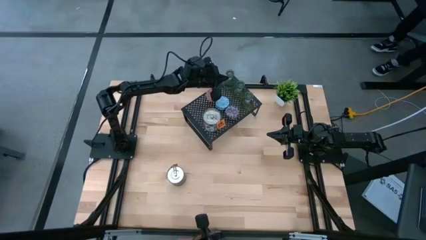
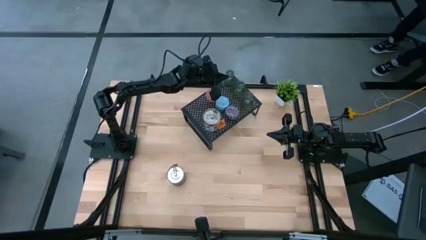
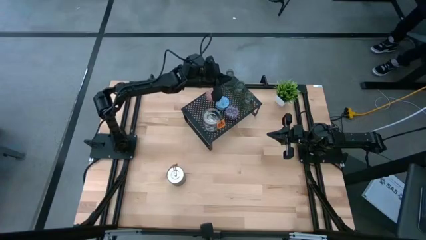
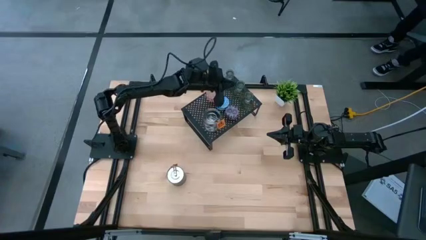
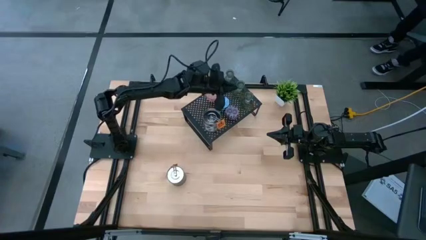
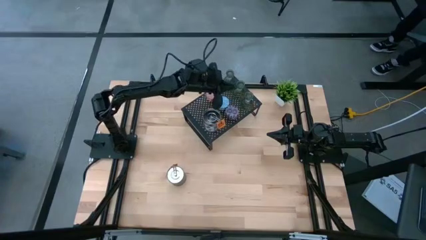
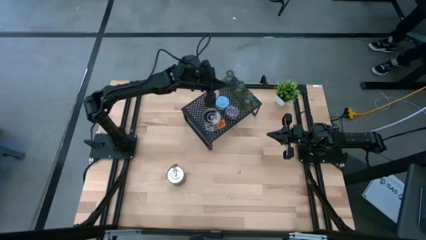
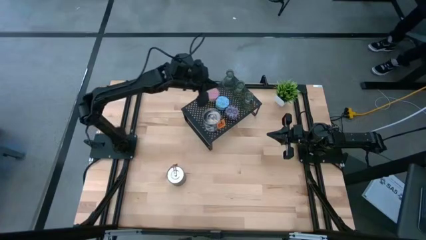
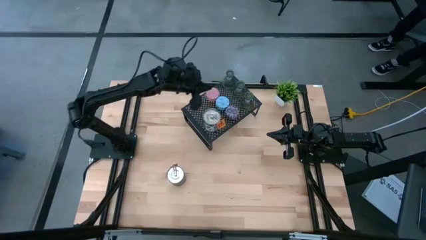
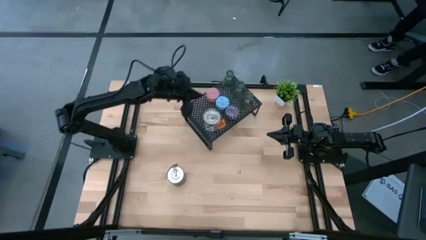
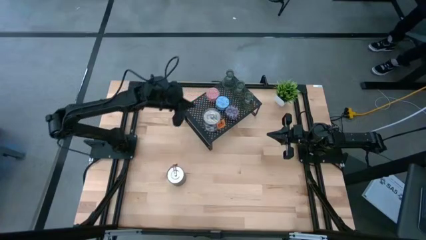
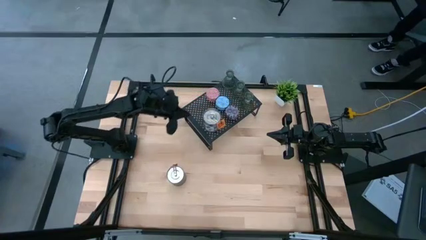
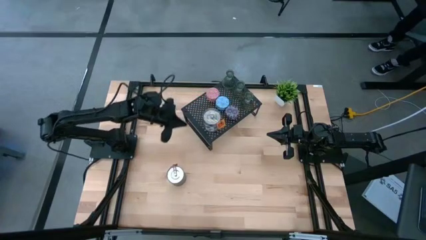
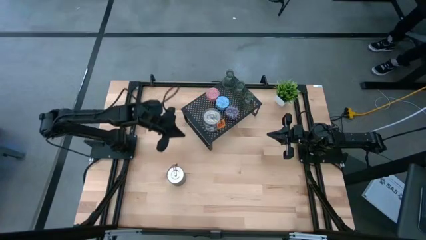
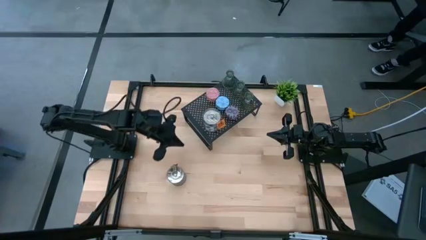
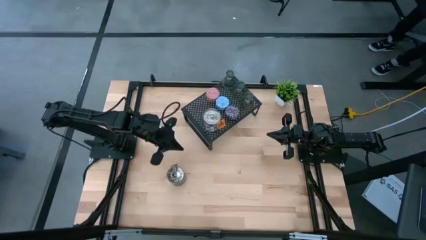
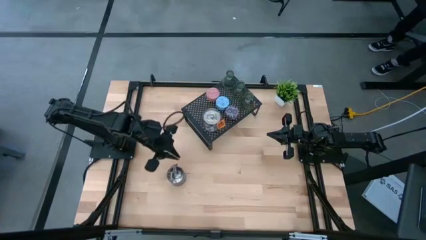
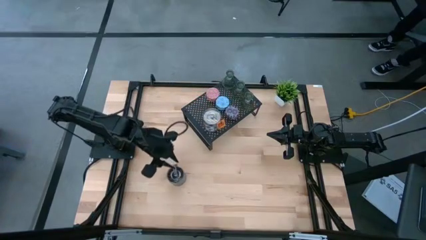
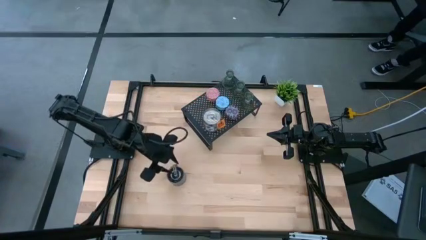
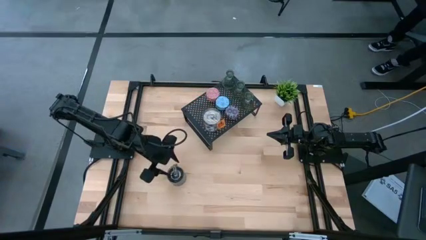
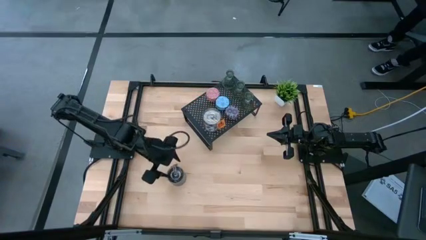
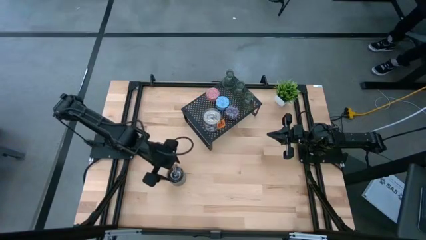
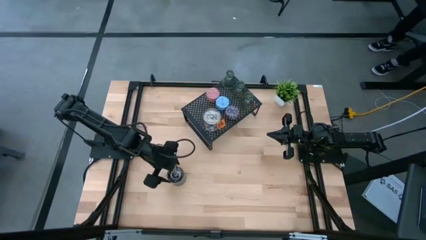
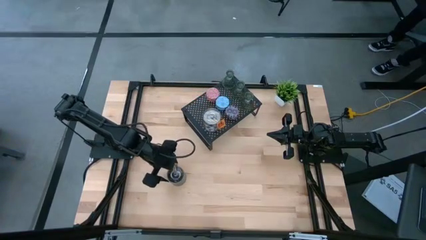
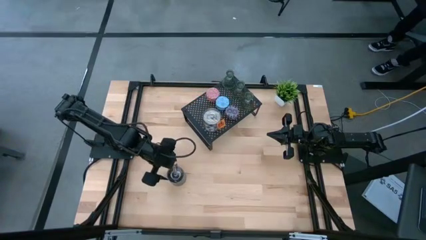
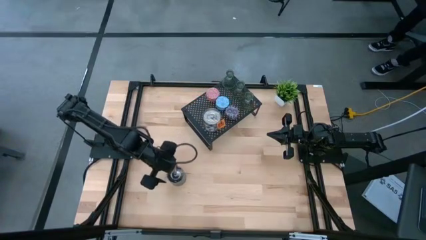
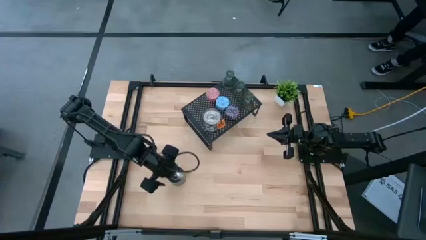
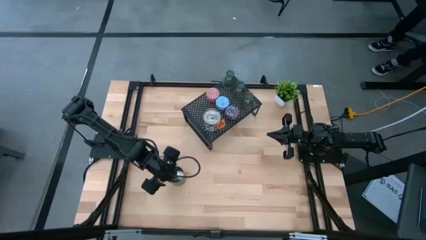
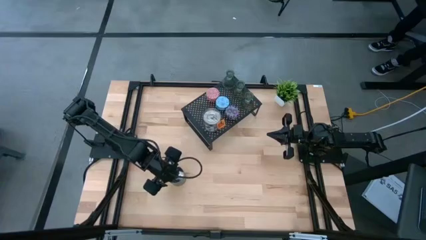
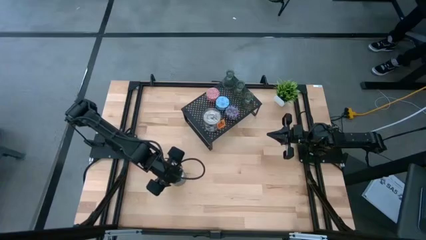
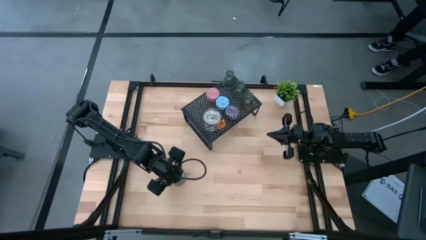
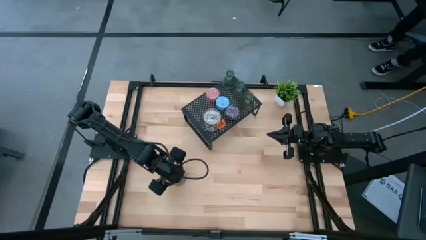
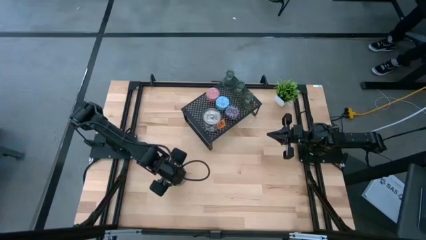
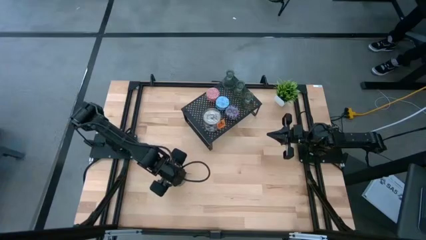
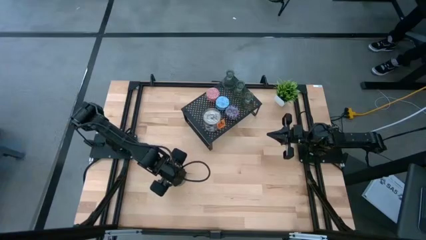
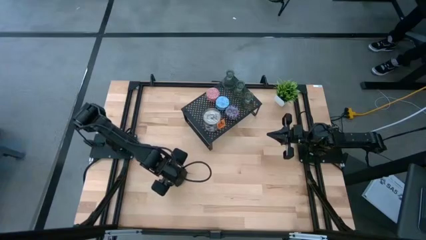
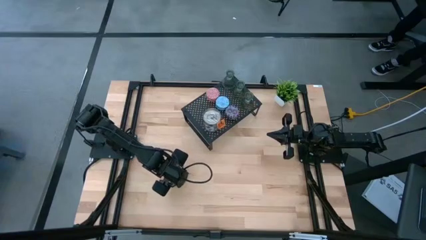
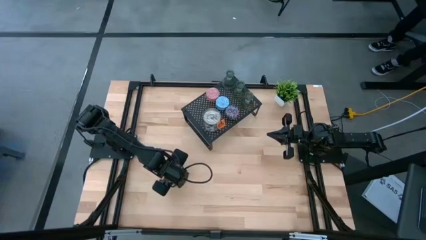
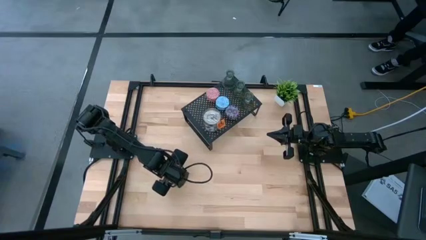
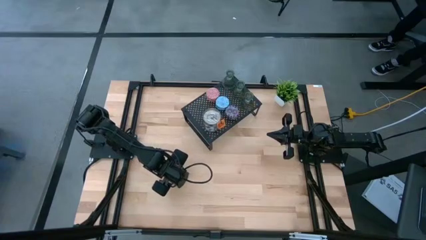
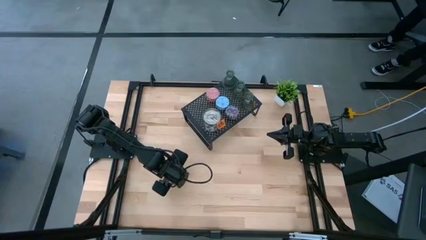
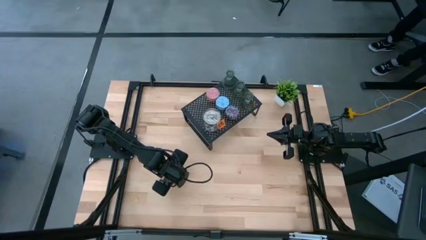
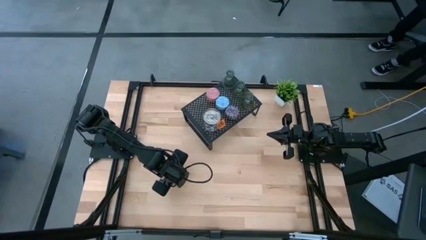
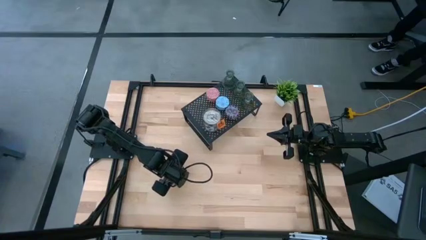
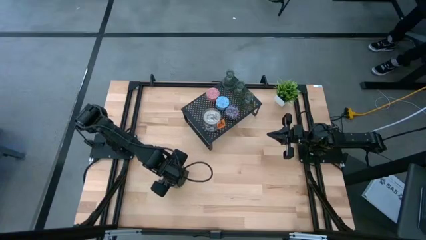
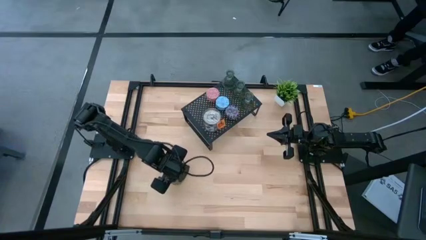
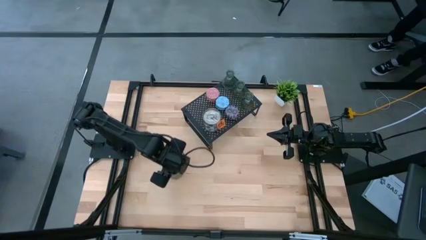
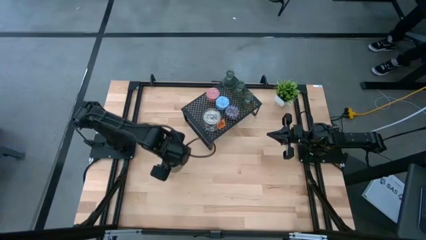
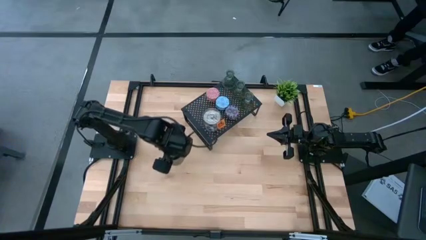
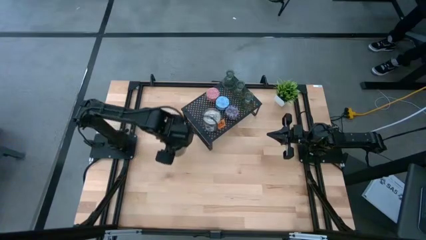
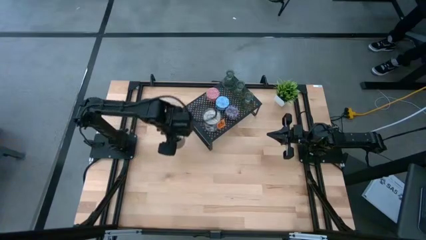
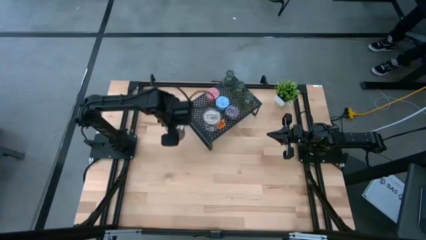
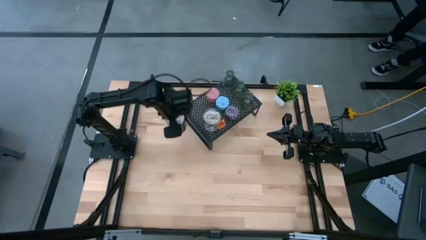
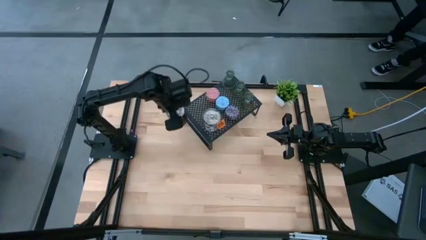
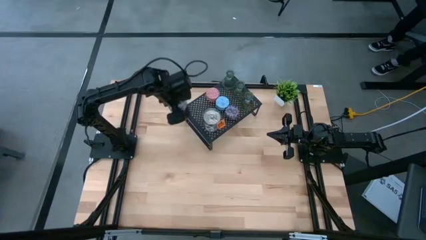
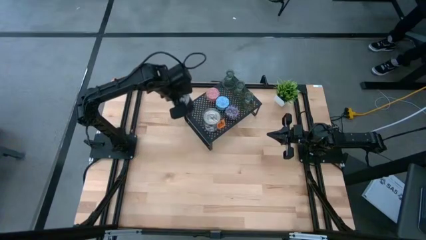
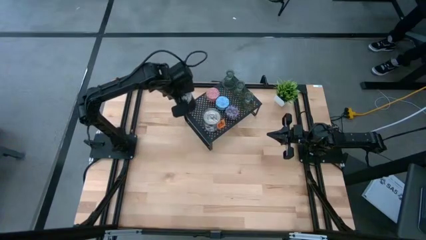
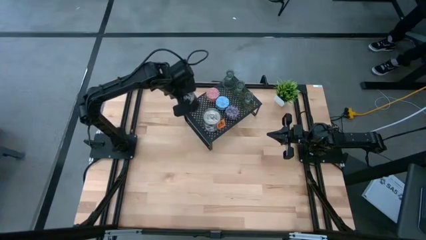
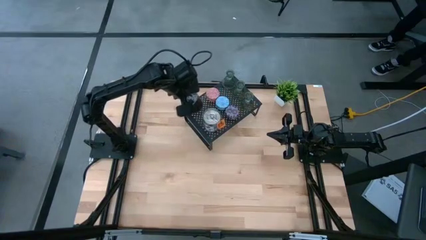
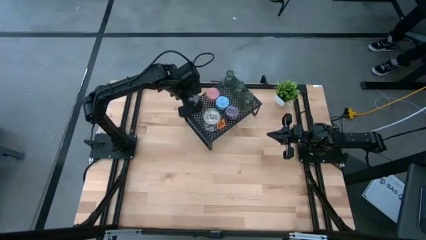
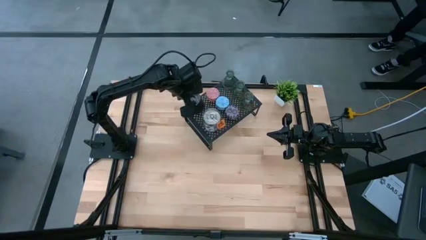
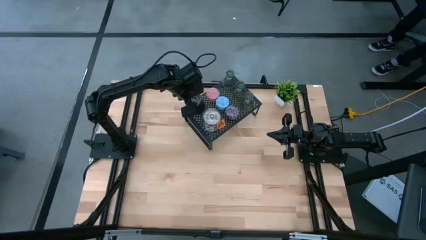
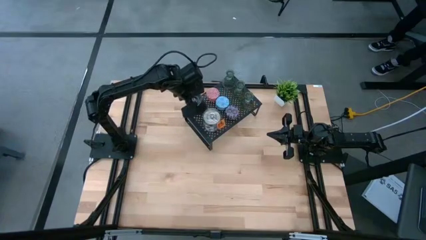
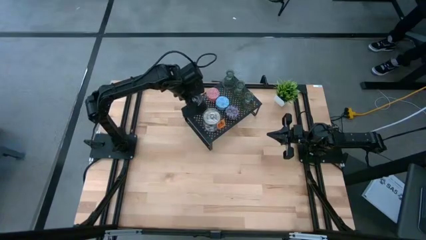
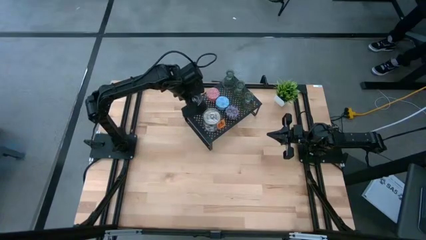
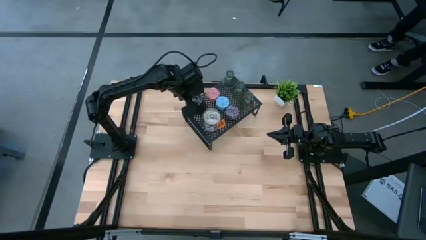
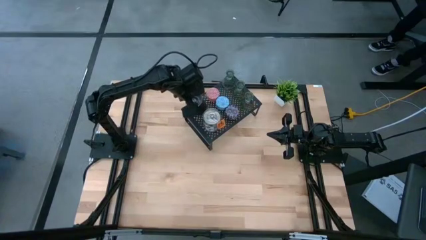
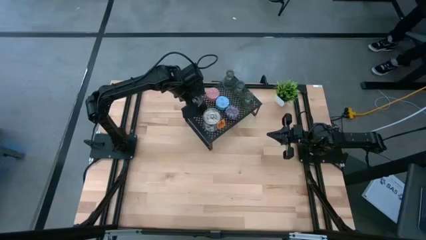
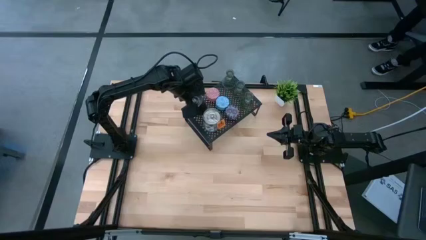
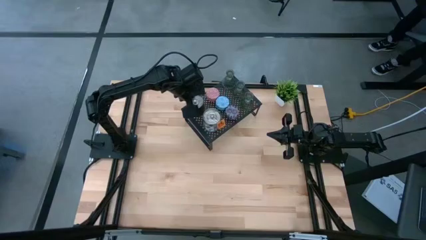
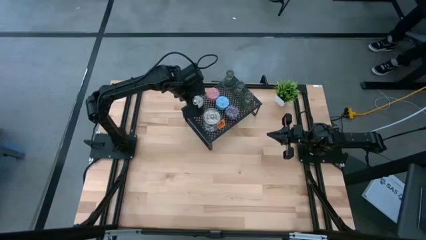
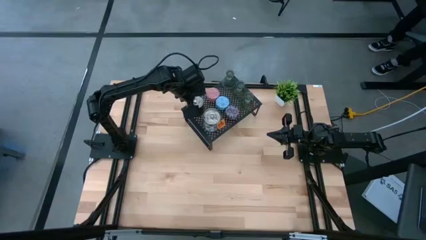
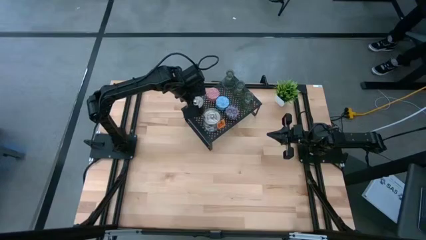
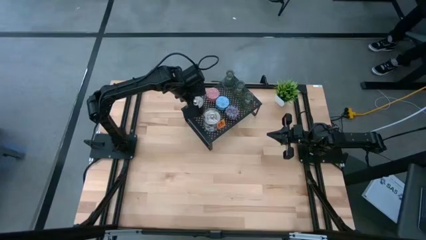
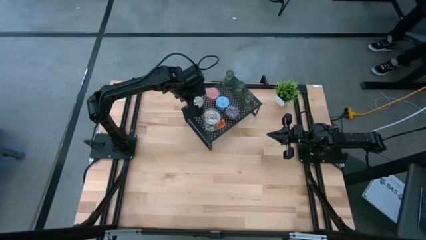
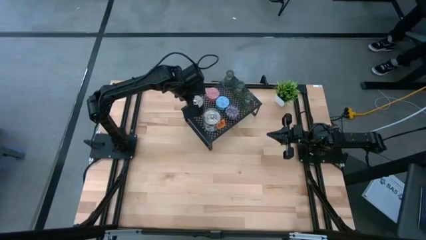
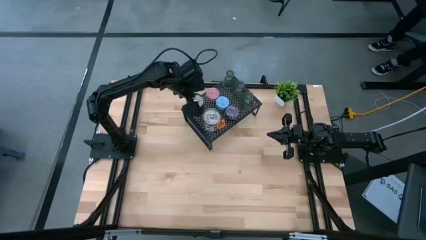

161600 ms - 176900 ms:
Task: Pick & Place candle stick holders
Put the large orange scented candle on the shelf aligned with the brown large scented candle
